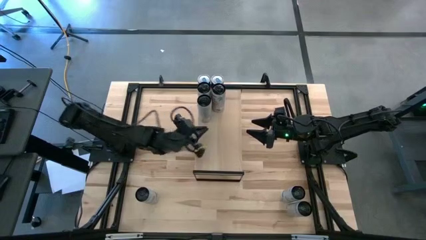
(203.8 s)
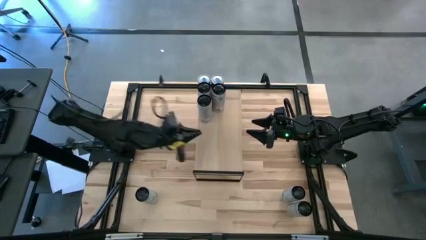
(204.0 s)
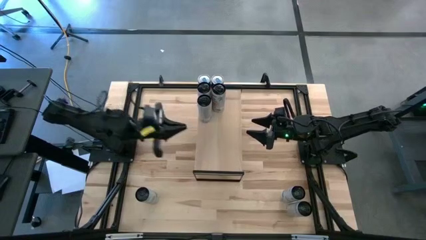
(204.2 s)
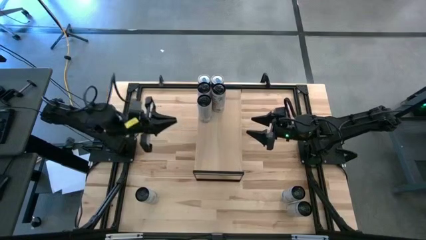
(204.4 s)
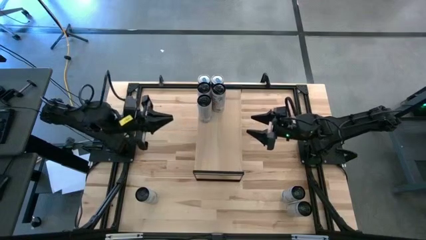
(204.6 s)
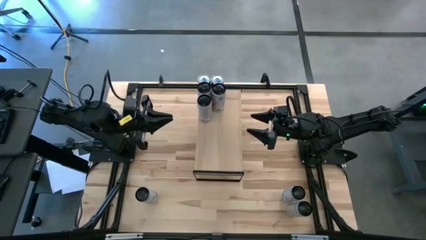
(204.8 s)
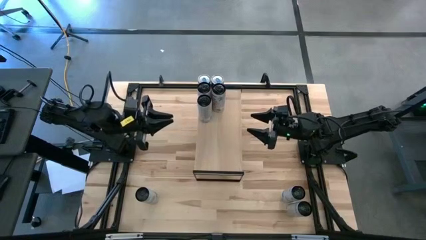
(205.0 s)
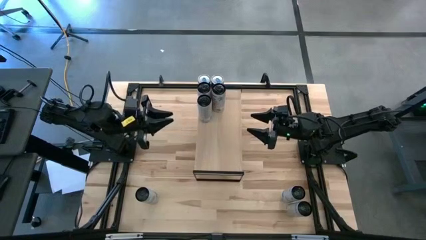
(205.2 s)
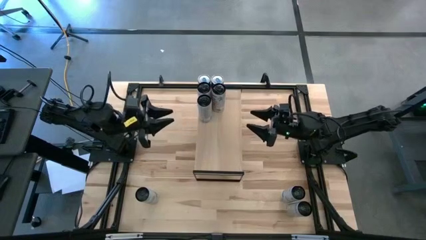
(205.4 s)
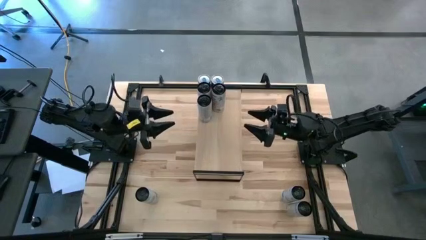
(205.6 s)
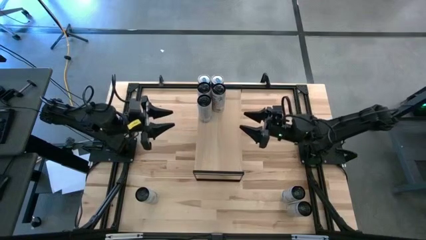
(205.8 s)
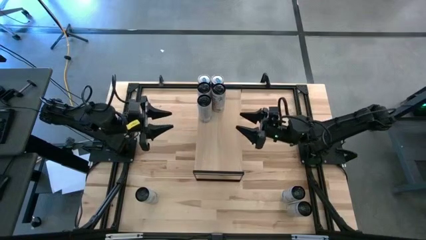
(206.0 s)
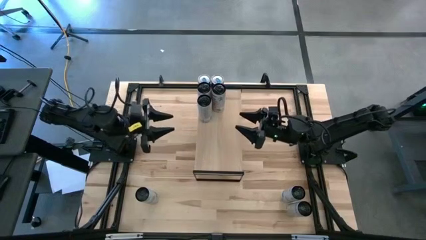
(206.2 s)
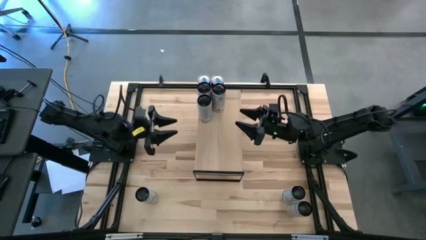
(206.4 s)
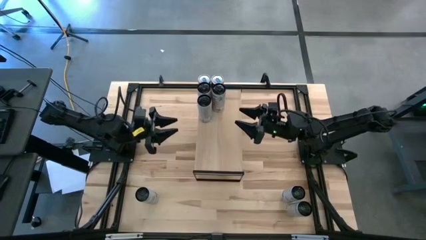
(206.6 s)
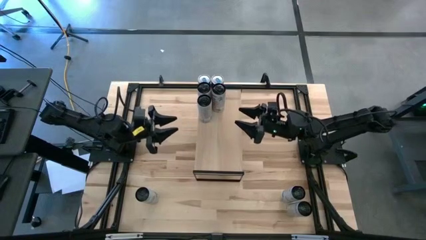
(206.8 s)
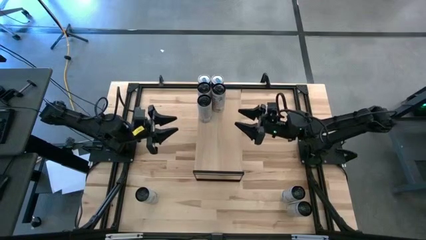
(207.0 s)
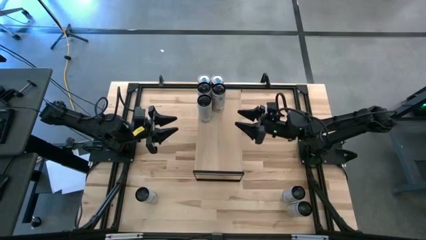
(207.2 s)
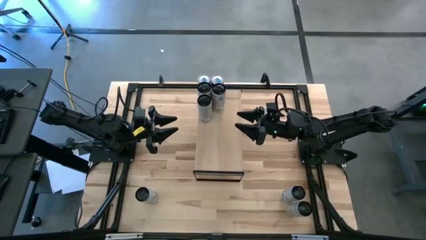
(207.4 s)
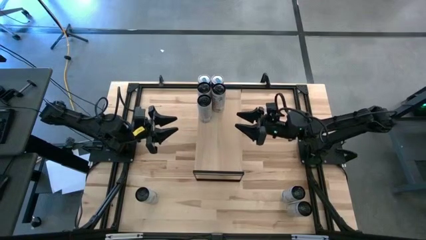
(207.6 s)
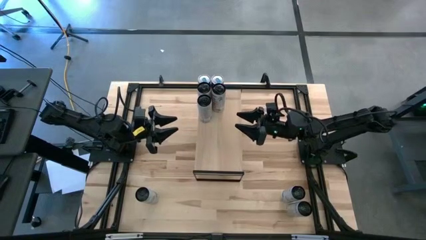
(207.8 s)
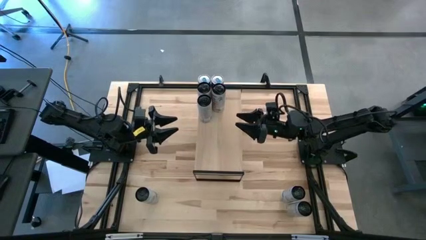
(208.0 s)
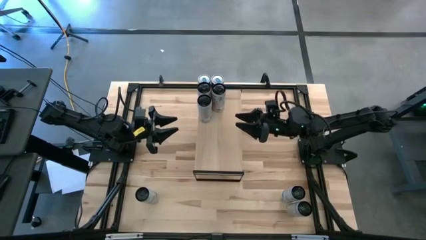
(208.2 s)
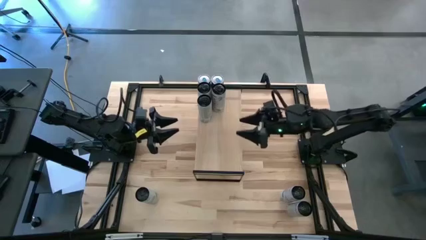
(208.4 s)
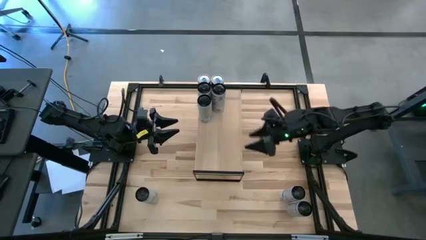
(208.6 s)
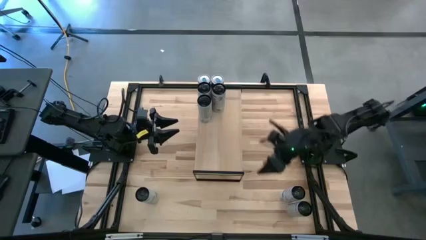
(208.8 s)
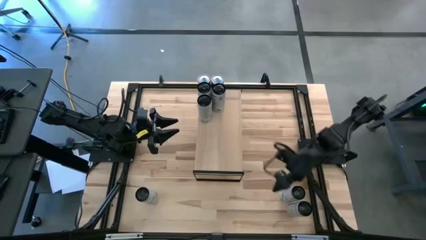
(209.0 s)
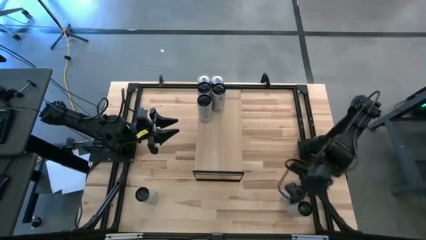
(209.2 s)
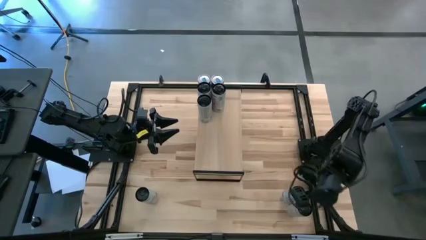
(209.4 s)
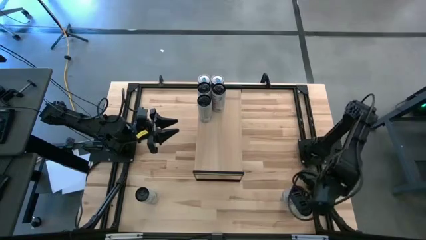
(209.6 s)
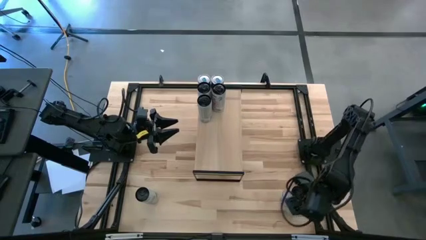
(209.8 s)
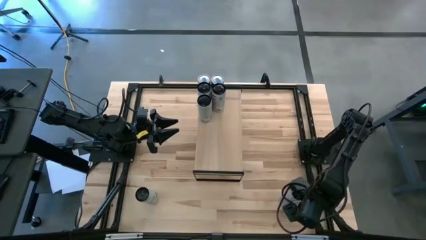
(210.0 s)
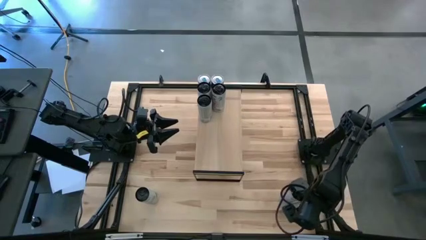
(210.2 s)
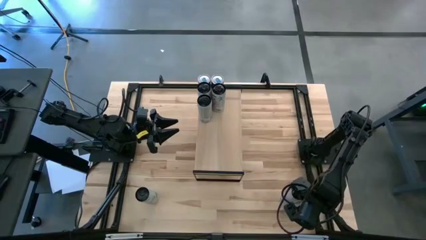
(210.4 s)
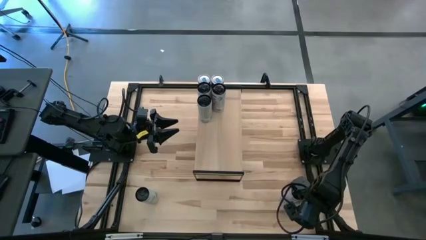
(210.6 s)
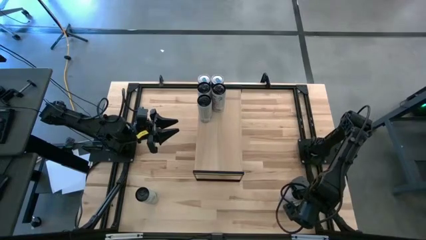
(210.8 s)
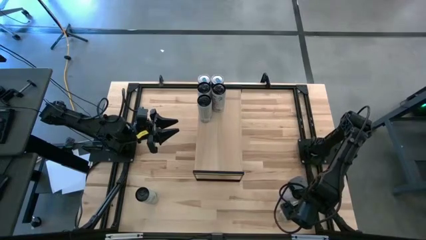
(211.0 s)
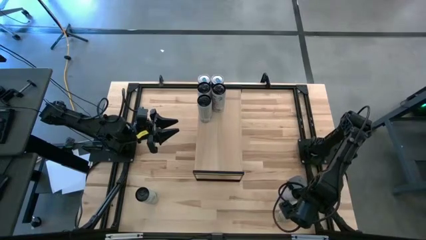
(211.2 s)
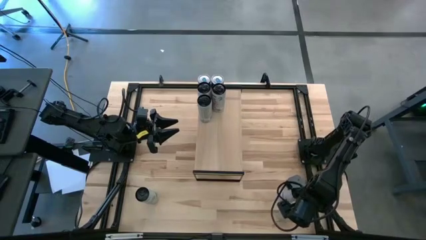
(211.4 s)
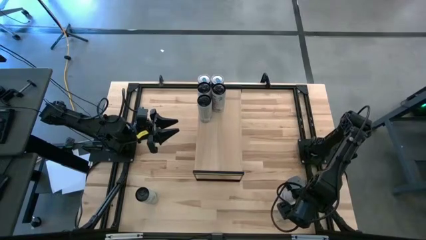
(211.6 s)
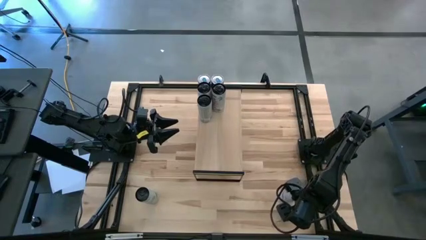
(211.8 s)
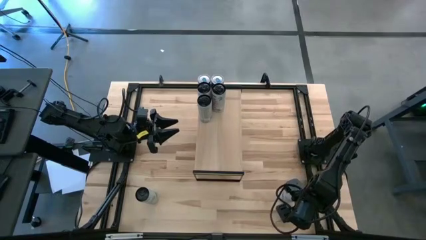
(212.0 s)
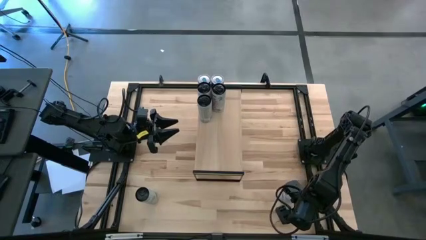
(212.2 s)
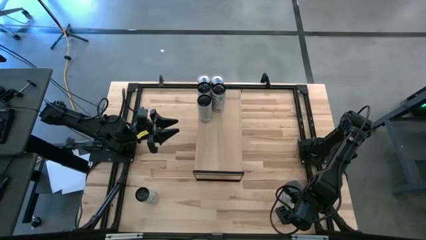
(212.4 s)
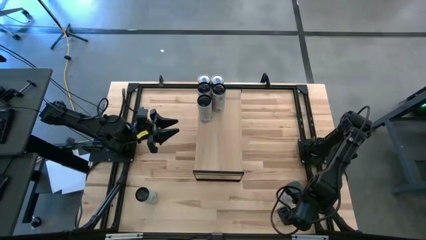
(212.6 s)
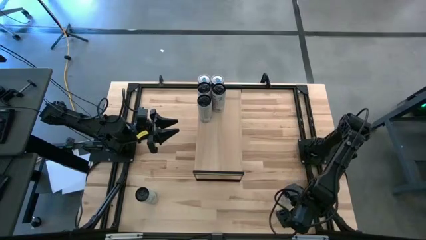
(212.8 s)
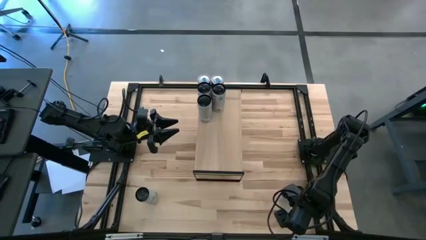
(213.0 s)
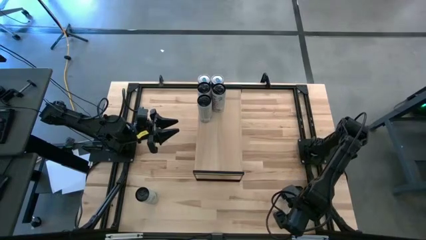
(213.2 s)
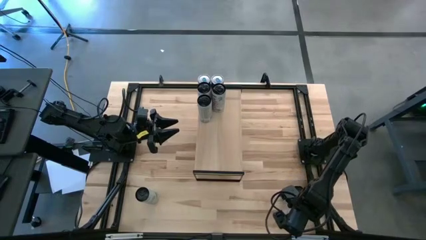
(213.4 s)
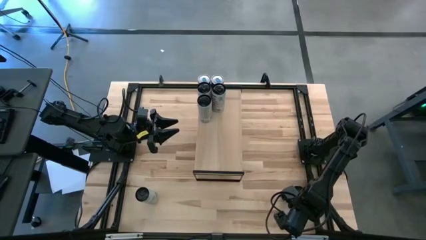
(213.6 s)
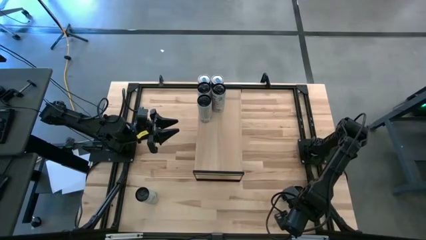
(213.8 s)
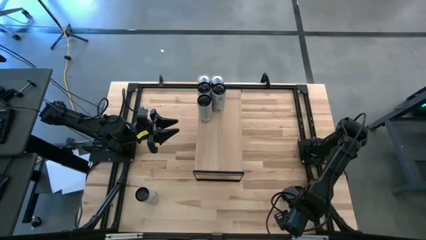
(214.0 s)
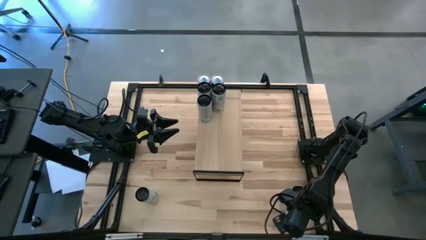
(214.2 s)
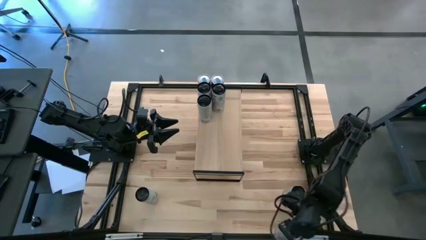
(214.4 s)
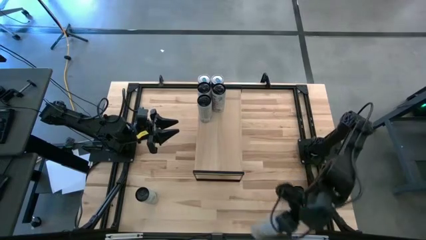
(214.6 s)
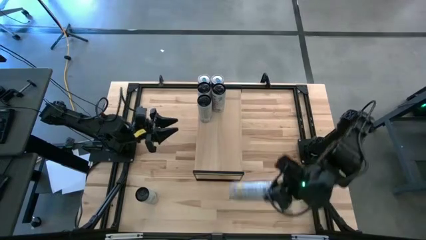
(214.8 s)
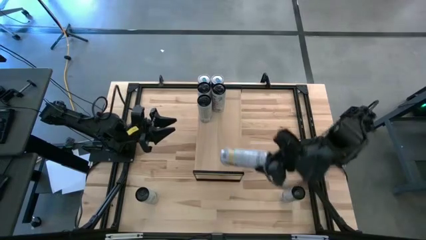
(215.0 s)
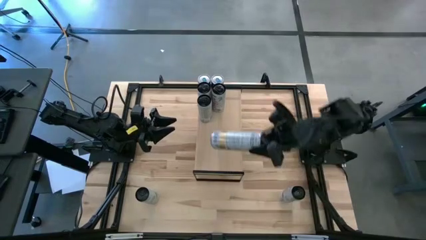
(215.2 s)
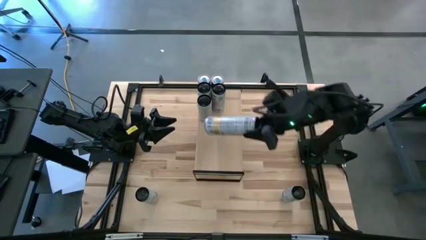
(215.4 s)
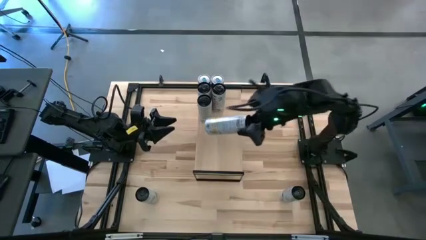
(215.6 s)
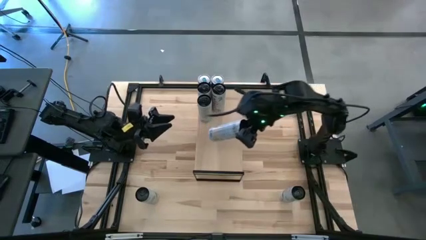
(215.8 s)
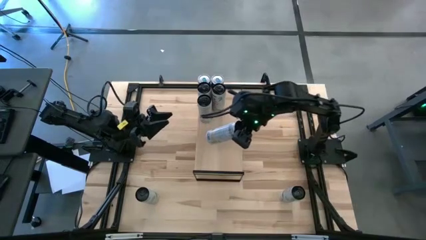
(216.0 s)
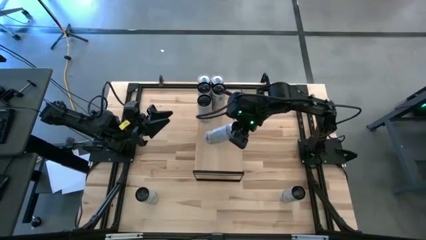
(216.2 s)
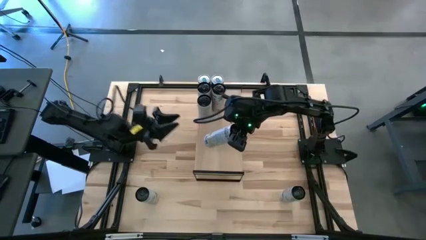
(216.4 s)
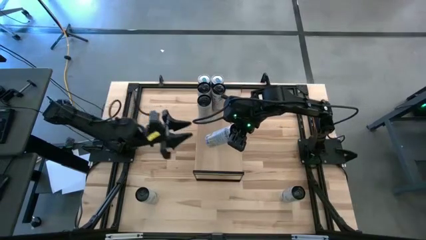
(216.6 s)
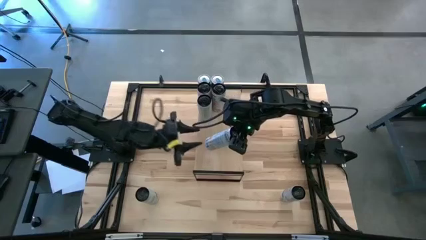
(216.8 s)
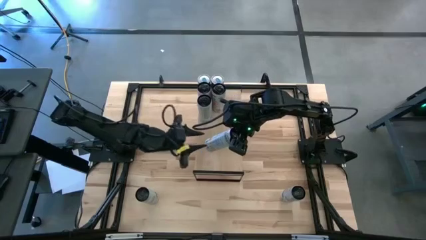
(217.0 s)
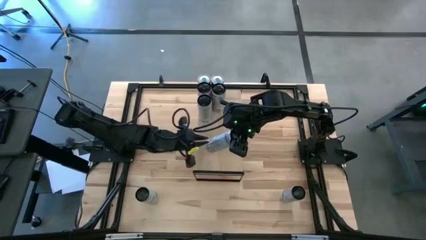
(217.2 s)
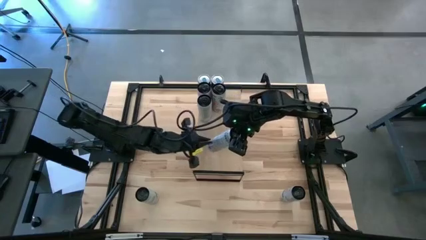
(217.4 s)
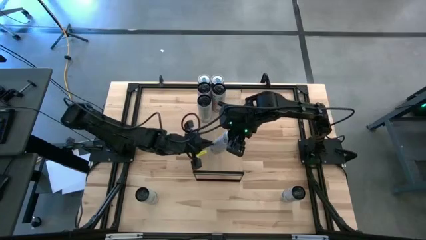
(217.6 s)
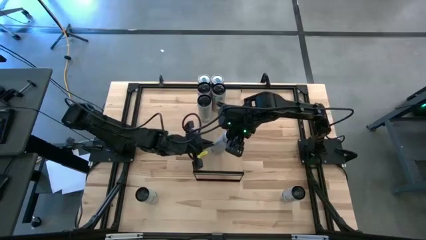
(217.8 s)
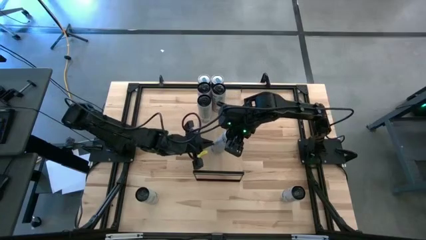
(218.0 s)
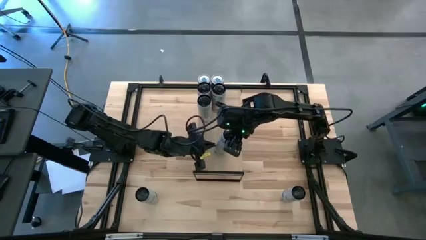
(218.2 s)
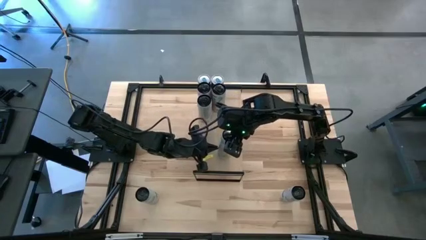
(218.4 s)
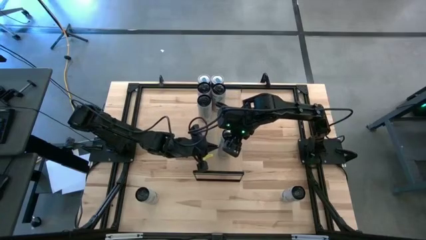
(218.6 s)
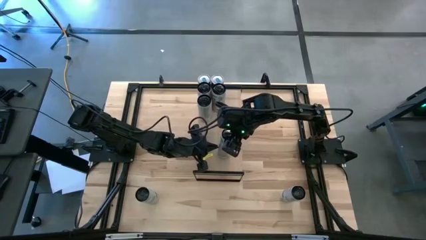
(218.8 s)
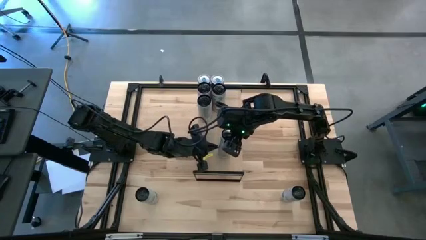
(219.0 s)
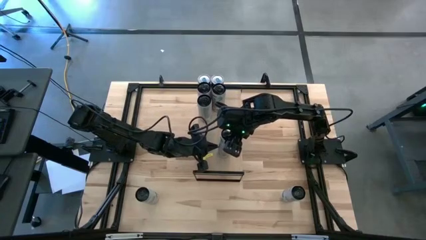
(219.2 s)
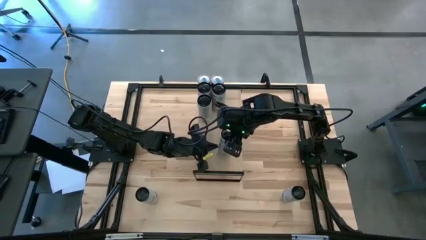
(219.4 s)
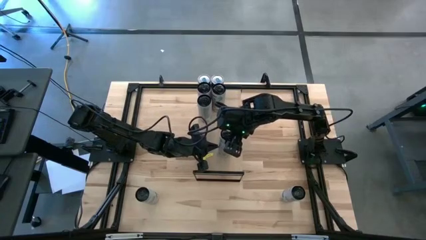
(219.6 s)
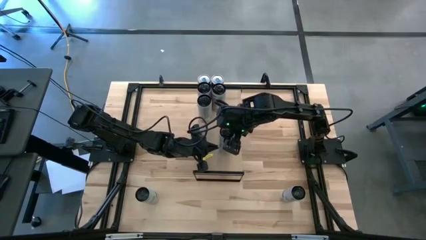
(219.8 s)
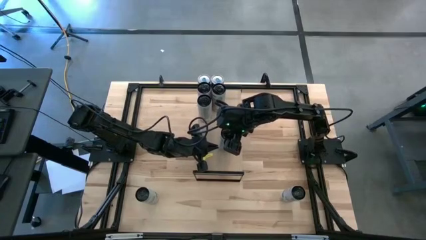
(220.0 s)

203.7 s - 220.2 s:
Task: Place canned beverage on shelf
Put the white yellow soda can on the shelf aligned with the other white yellow soda can
